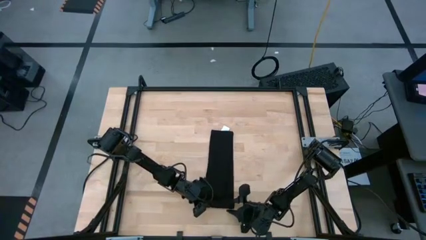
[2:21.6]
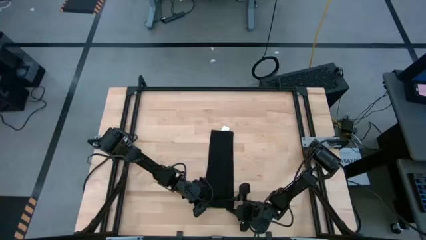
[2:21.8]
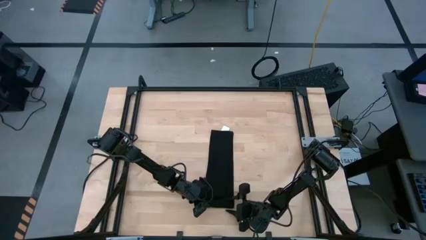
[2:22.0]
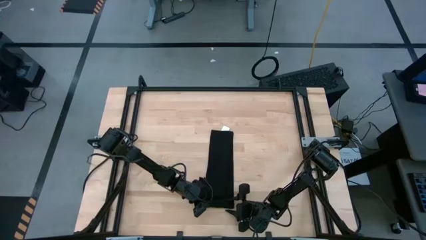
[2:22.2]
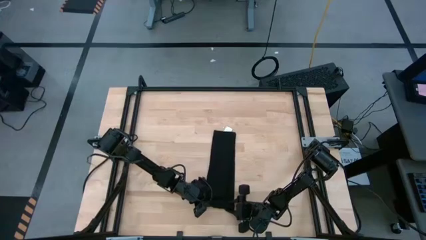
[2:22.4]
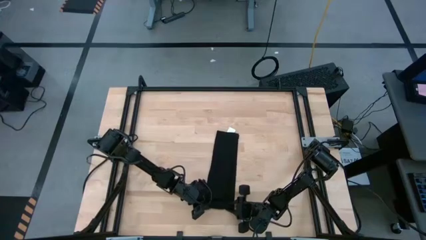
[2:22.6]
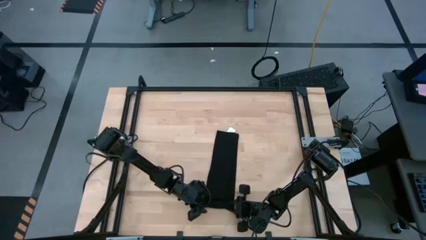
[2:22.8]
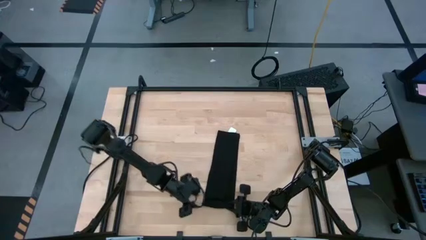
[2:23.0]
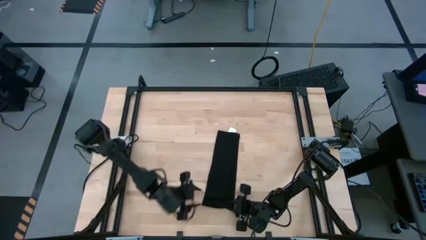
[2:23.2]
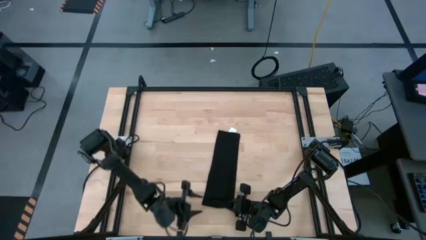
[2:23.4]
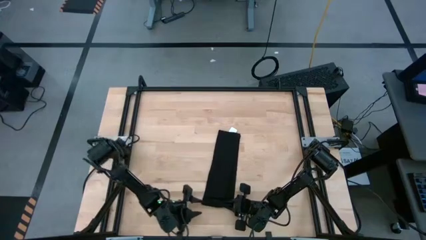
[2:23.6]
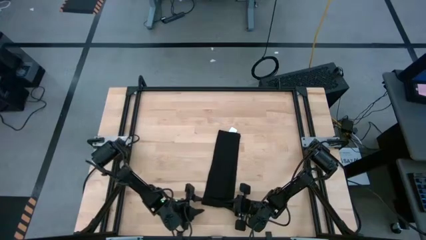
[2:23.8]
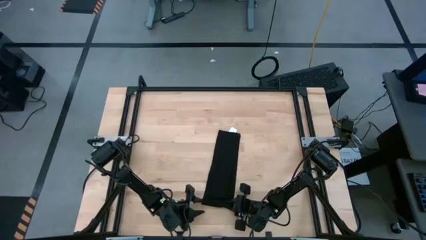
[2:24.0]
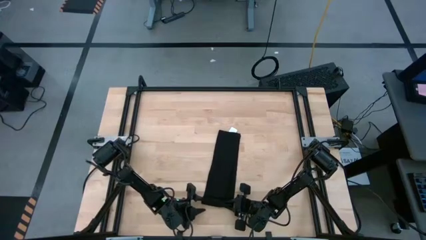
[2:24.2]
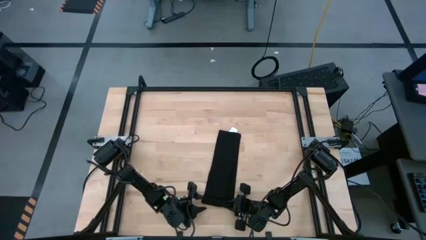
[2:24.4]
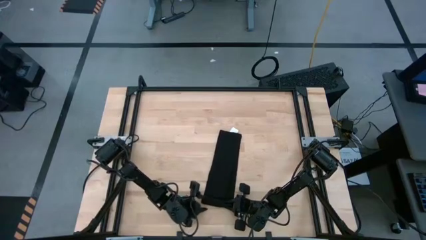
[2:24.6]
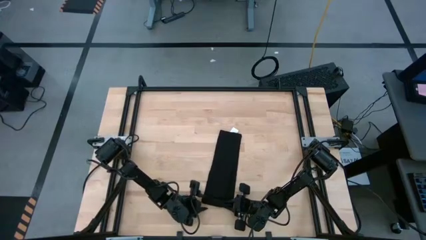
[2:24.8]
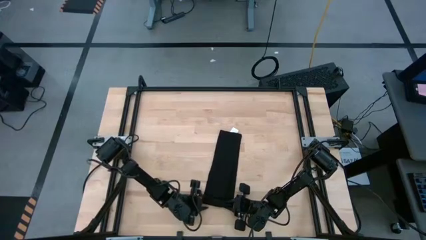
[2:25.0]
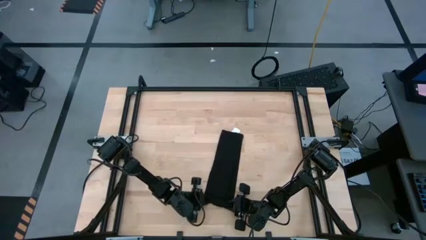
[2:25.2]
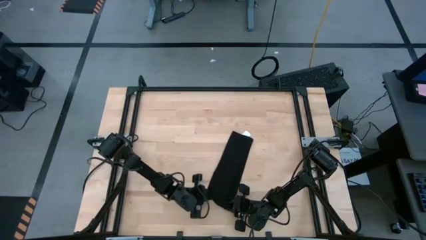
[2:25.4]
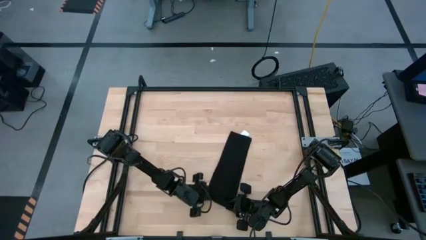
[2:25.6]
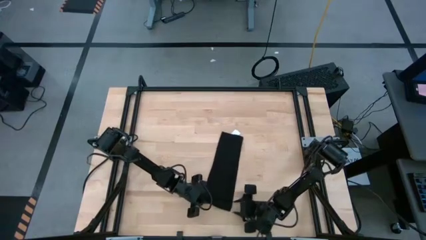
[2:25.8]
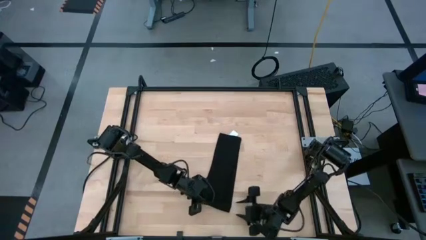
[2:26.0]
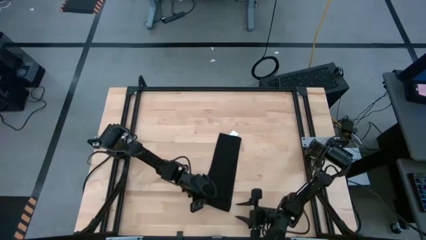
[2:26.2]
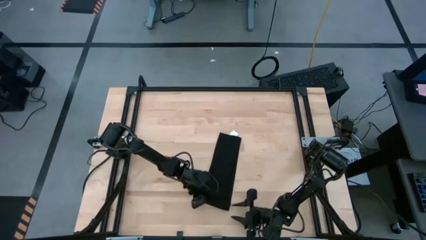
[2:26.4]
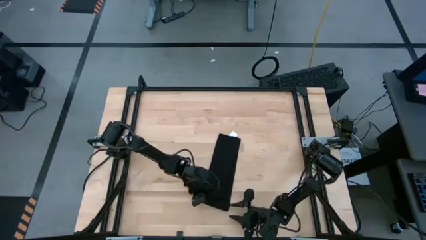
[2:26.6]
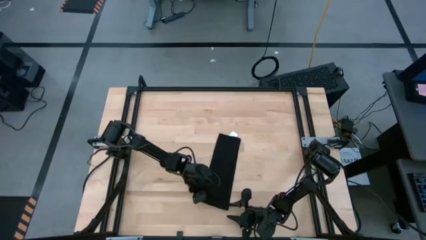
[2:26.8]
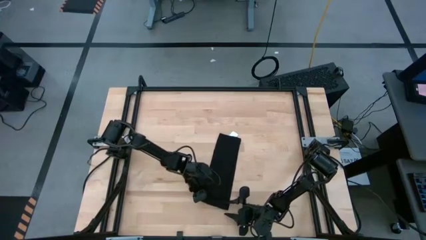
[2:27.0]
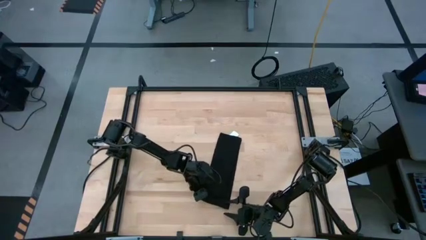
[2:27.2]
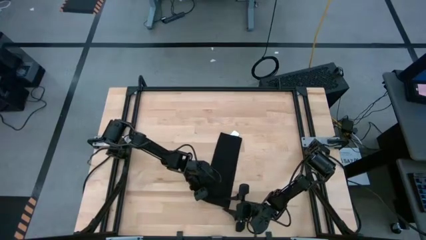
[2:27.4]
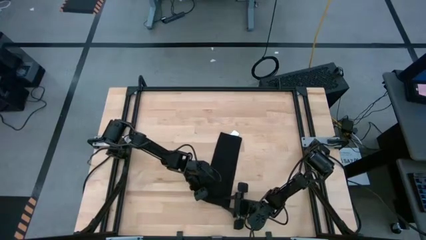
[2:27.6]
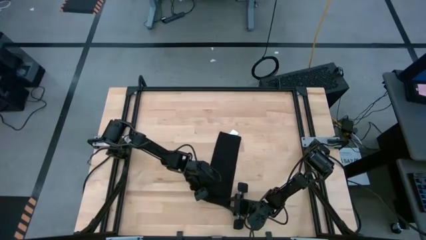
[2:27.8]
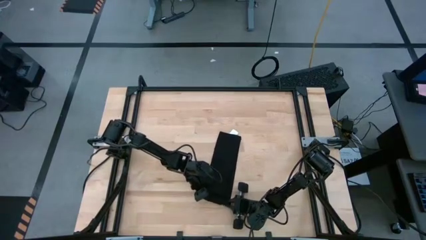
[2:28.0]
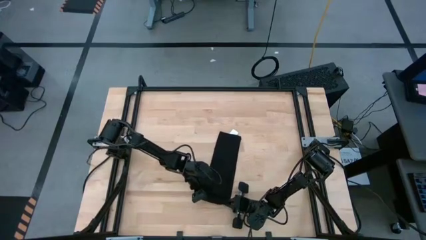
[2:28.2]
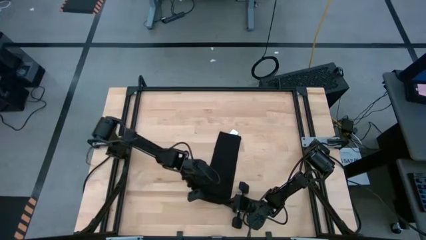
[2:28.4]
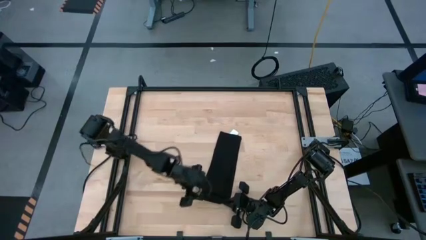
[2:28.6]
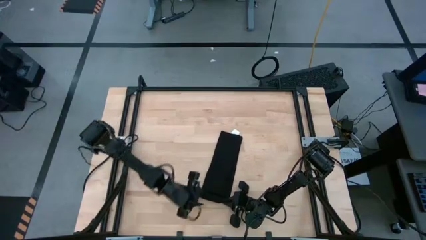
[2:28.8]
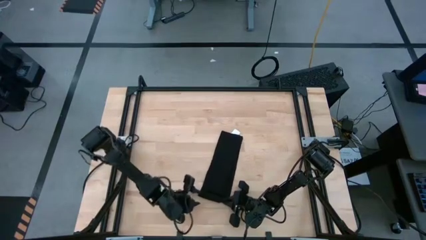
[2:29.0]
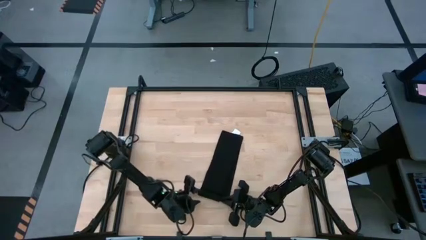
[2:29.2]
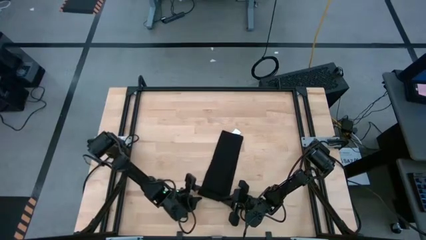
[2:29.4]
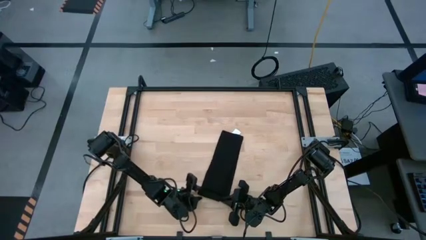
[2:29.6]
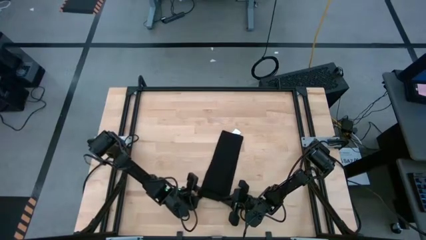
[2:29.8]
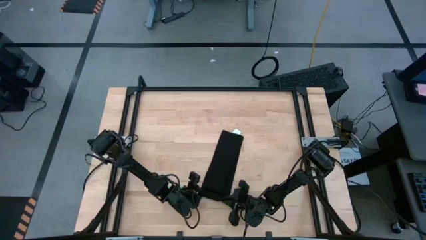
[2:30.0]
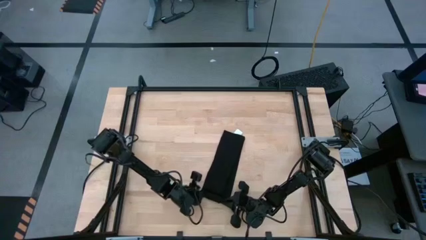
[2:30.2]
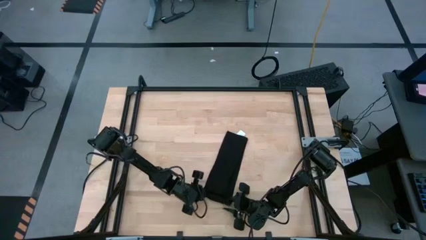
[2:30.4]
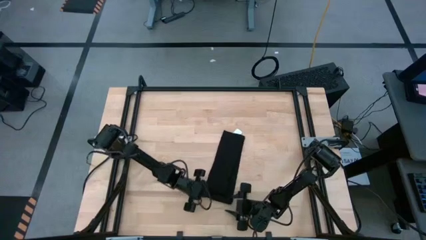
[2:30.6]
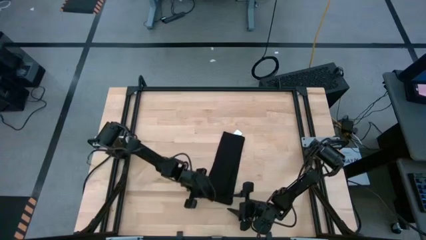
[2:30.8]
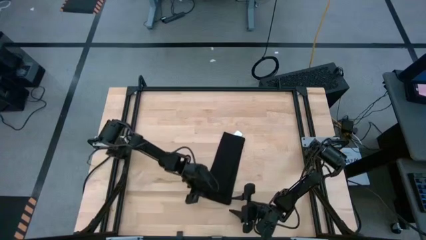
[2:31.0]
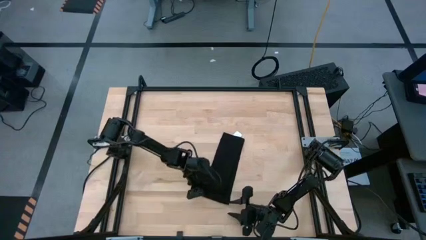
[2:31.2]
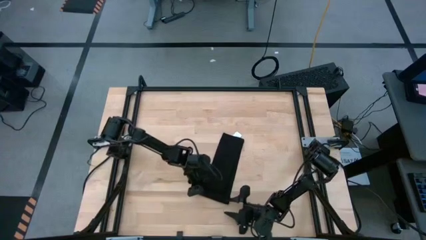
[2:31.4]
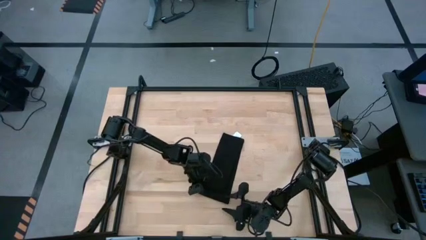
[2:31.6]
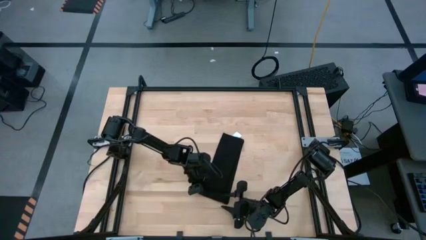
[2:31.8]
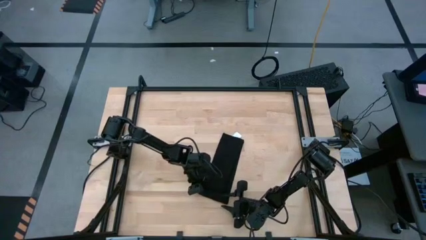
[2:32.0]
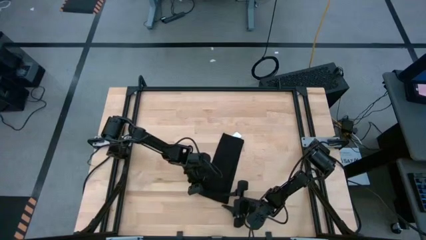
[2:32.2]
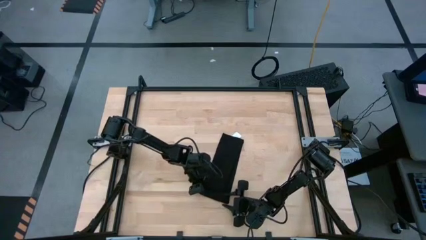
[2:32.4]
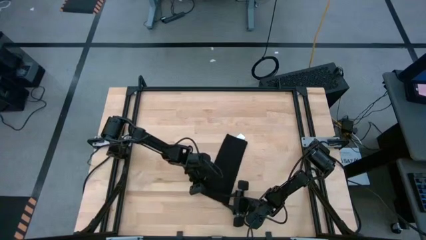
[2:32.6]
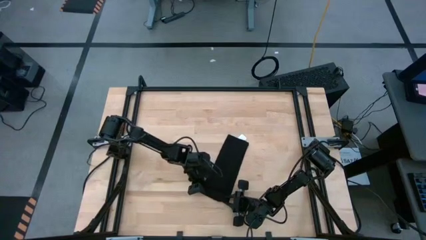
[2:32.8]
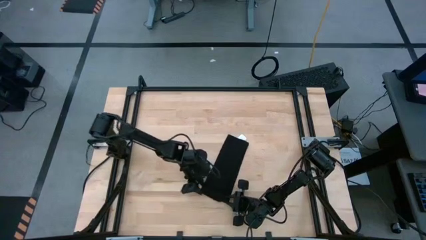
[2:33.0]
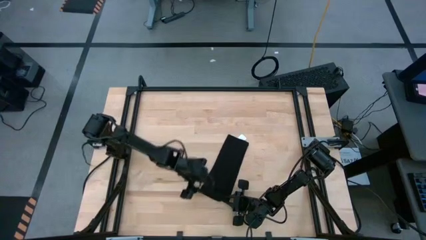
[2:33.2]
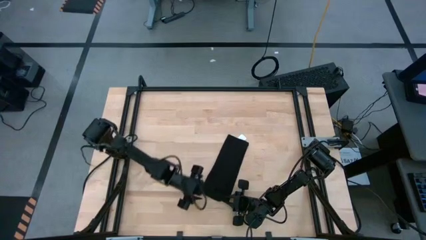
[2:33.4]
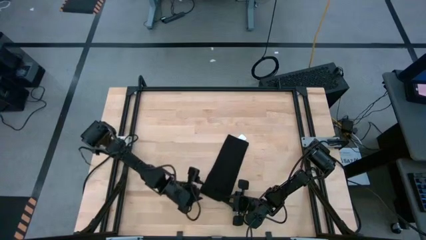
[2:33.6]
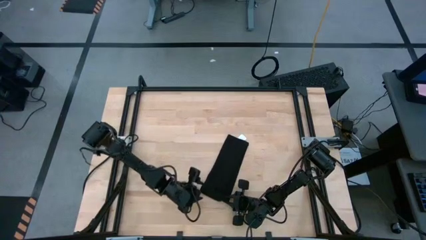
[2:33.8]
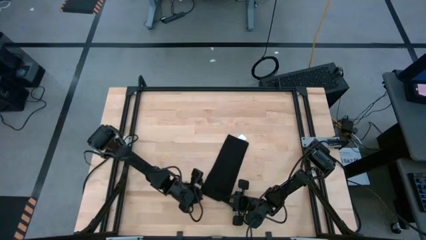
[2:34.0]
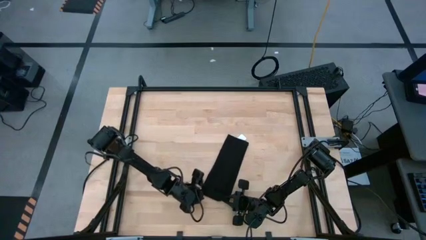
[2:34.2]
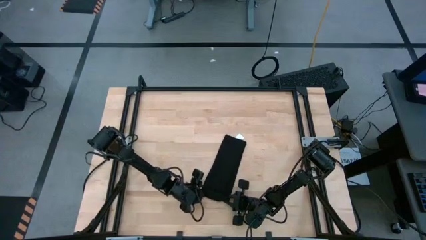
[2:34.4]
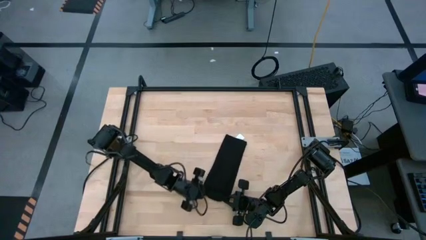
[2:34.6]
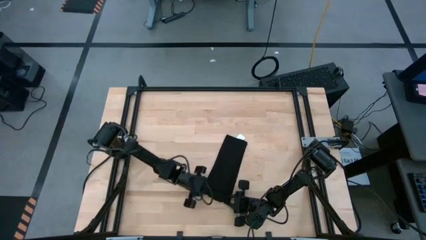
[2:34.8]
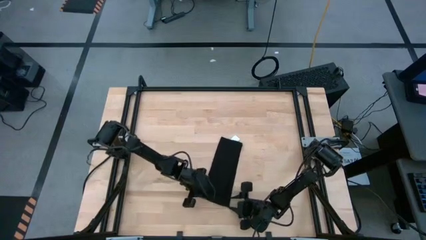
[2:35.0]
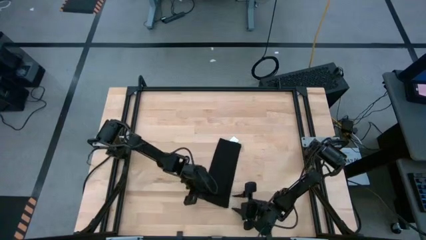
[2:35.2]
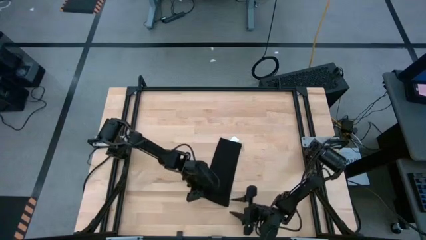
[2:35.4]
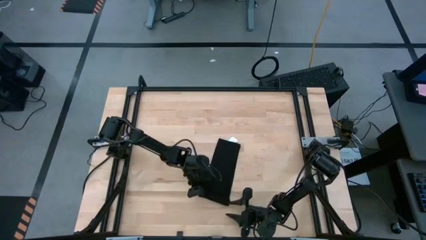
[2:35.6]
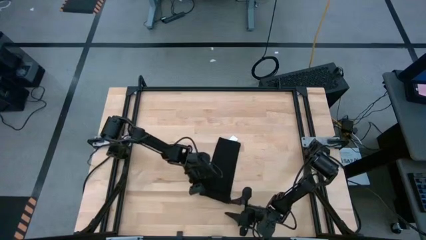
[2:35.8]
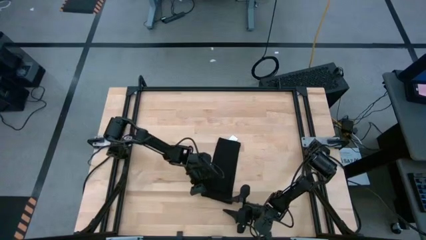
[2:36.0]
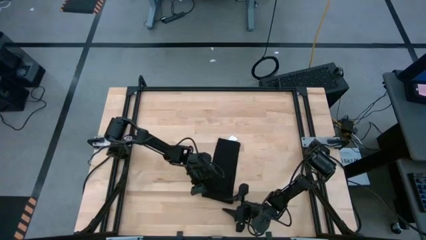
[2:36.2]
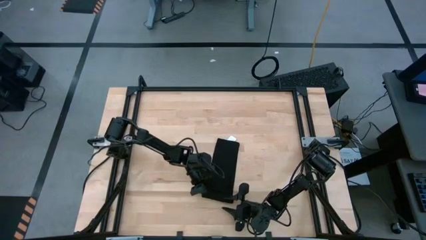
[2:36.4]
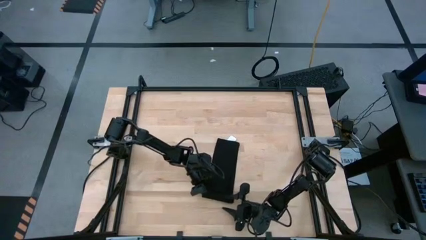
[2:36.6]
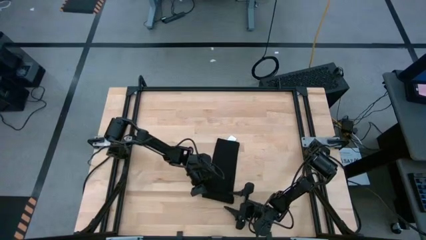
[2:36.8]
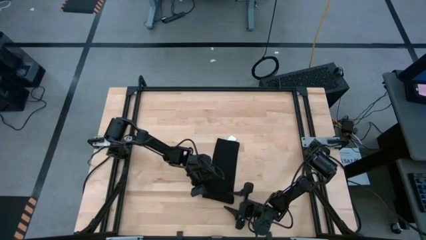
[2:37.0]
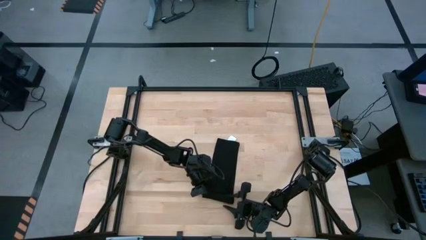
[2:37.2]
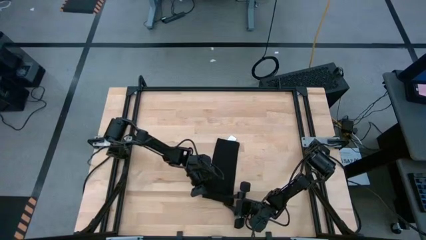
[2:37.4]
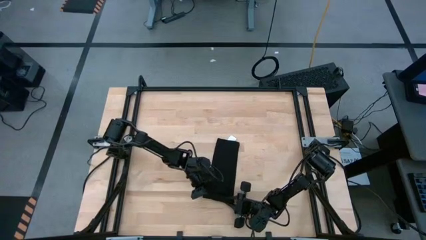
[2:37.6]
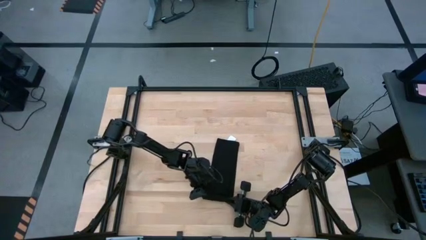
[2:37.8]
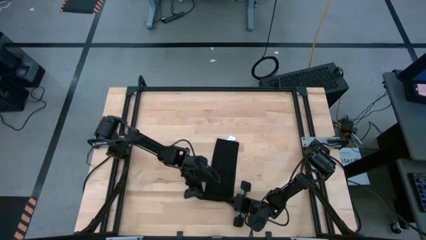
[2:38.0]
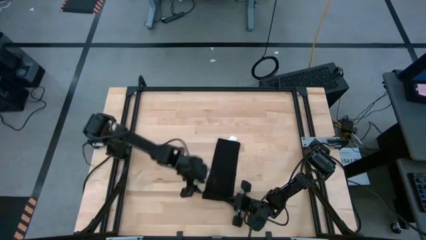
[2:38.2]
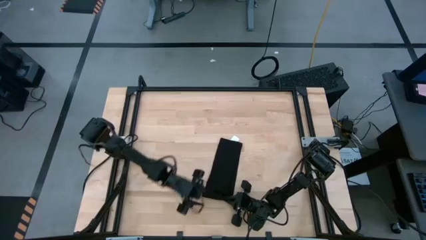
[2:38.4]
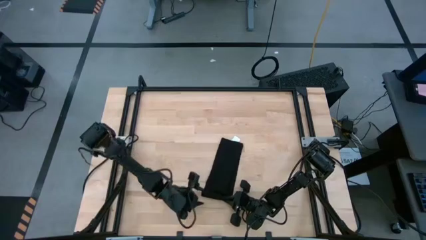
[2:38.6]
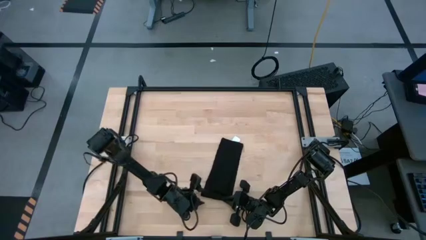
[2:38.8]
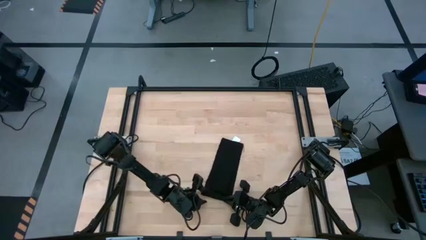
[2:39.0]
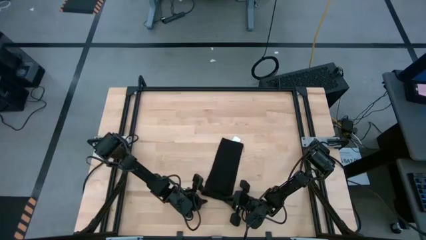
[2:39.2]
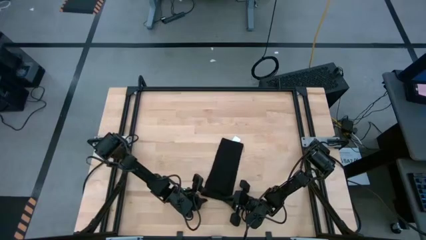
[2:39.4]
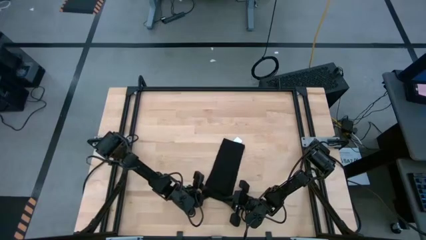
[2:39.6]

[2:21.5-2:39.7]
Task: Roll napkin
Roll the black napkin
